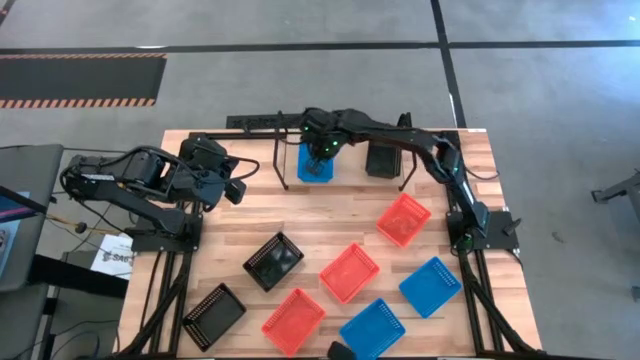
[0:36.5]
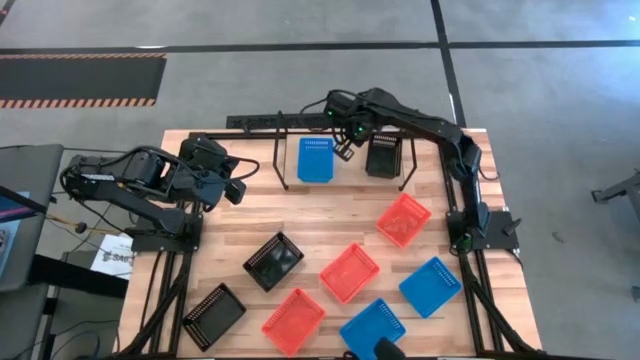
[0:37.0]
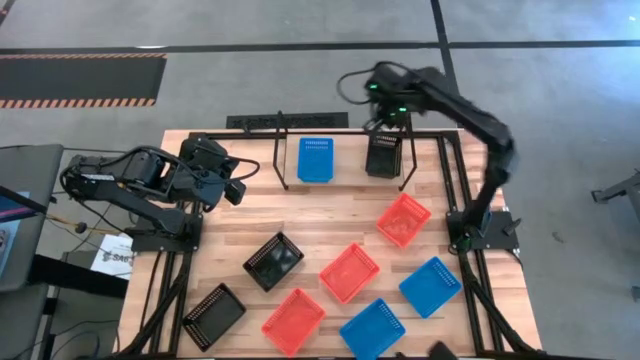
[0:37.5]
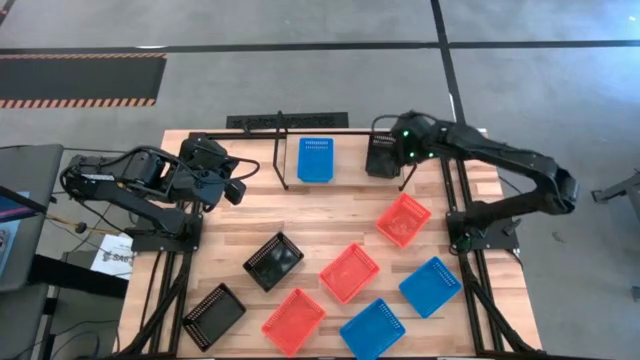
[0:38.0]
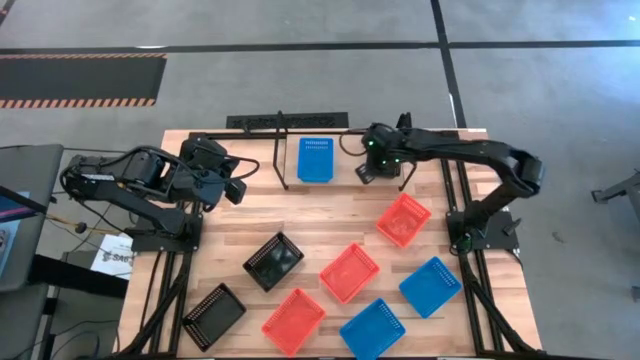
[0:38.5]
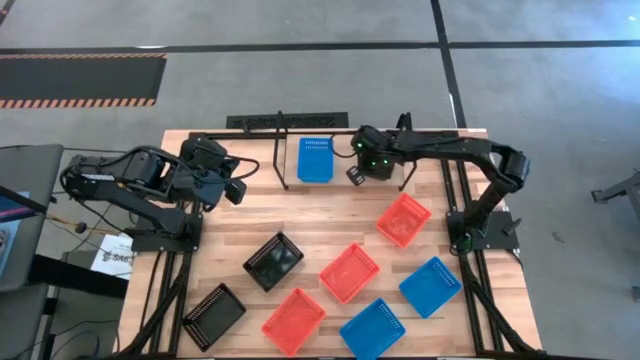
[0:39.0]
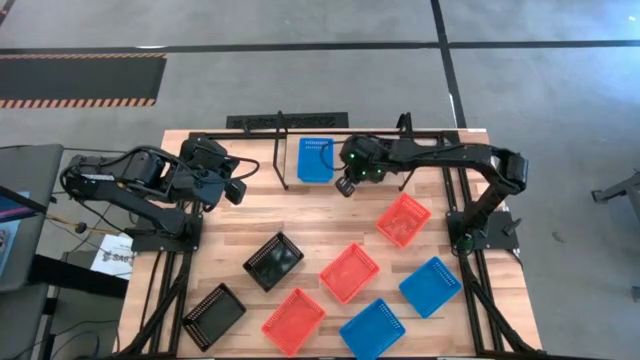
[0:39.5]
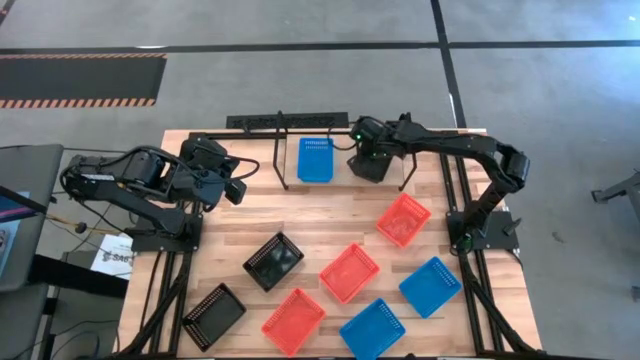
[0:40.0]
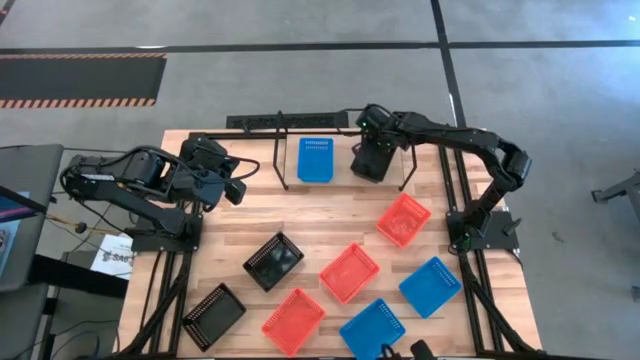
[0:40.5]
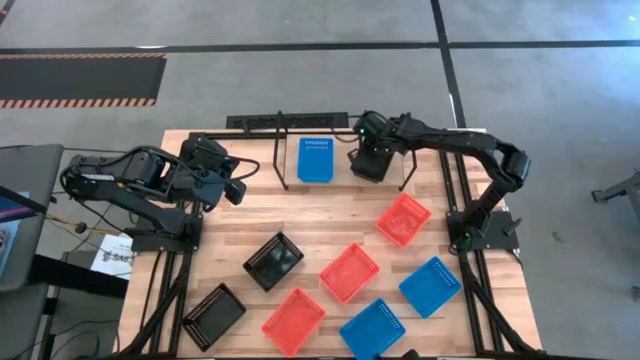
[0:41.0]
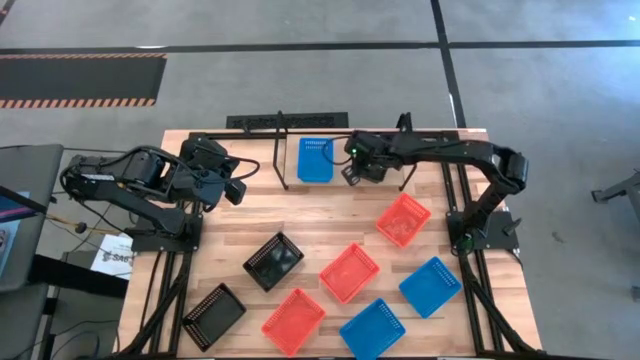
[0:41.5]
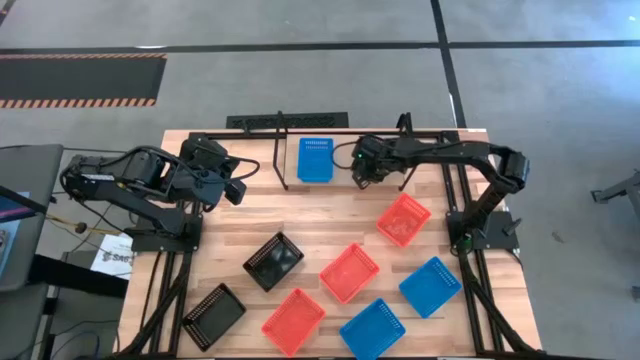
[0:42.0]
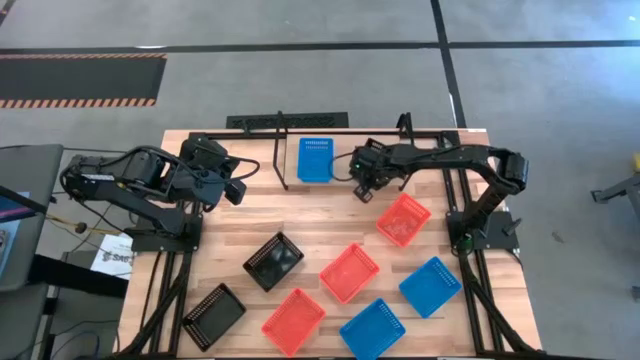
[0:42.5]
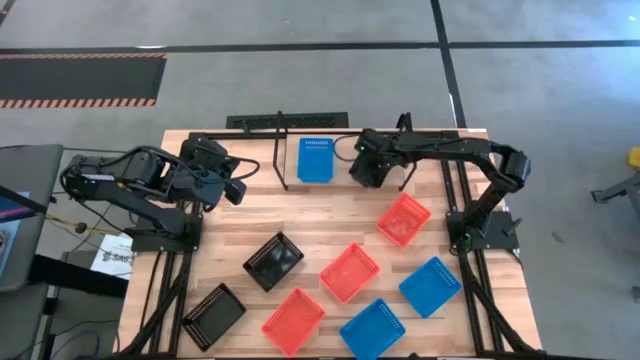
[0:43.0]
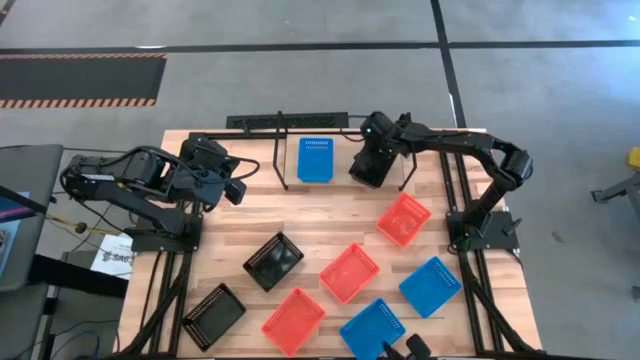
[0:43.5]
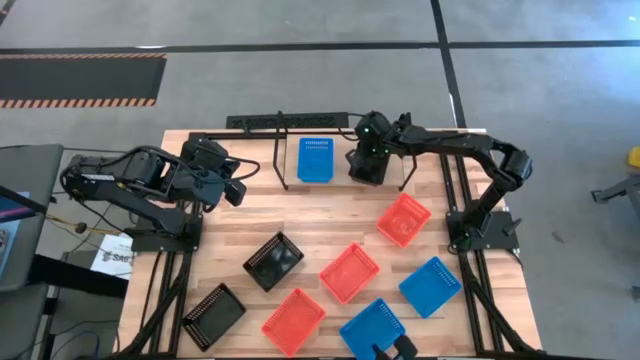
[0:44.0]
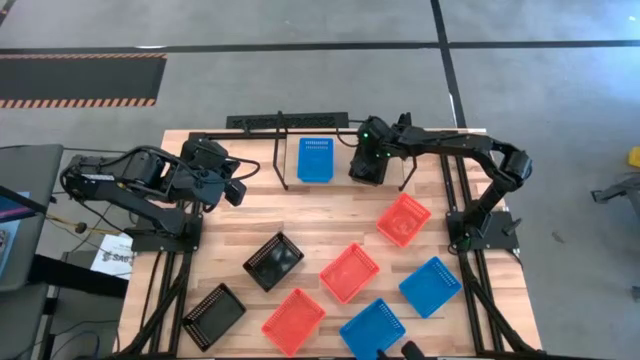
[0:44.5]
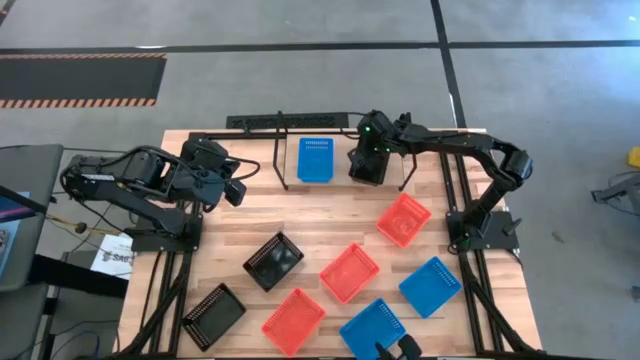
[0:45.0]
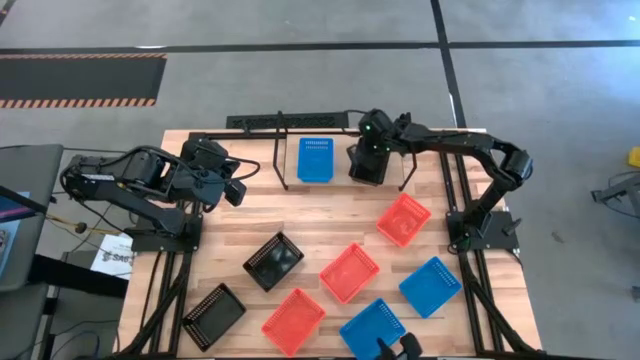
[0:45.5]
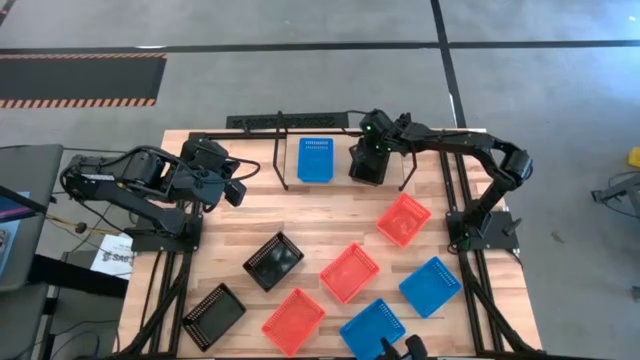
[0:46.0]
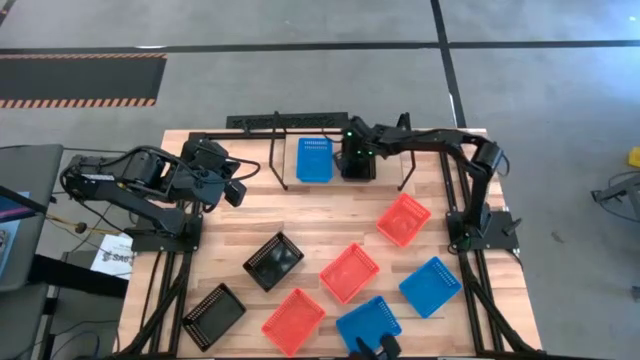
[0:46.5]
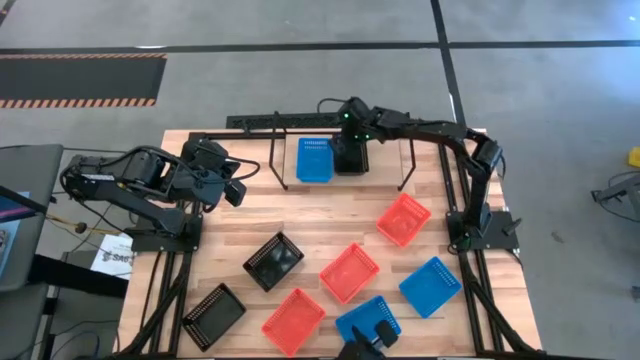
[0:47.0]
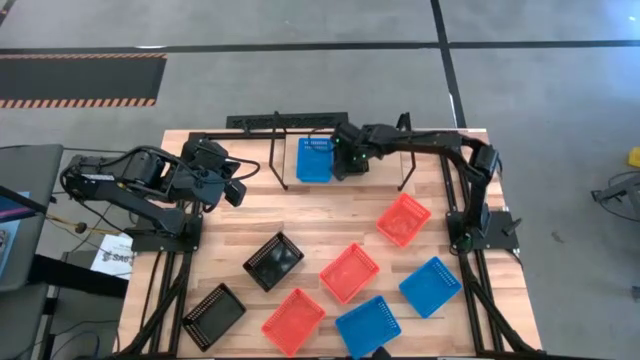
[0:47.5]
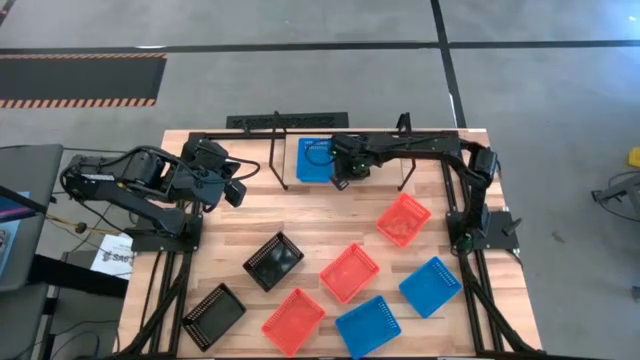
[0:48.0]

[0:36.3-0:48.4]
Task: Stack baskets on shelf by color
Adjust the black bin on the shelf

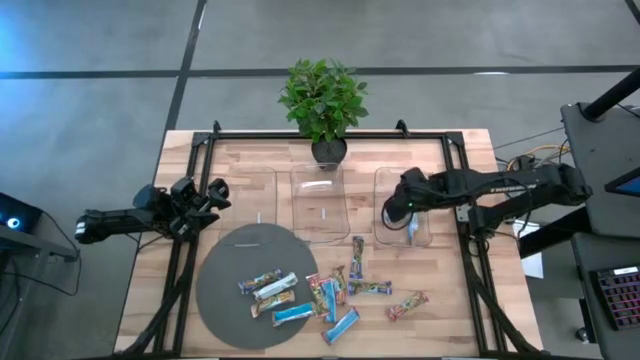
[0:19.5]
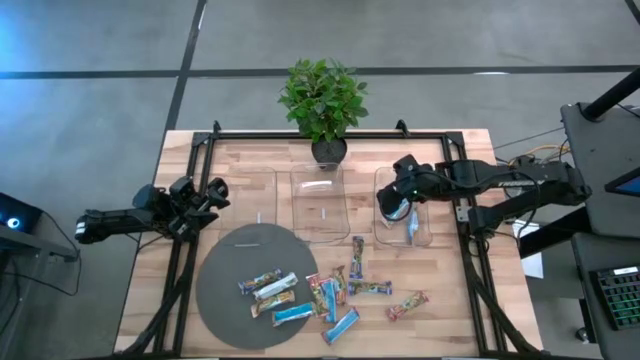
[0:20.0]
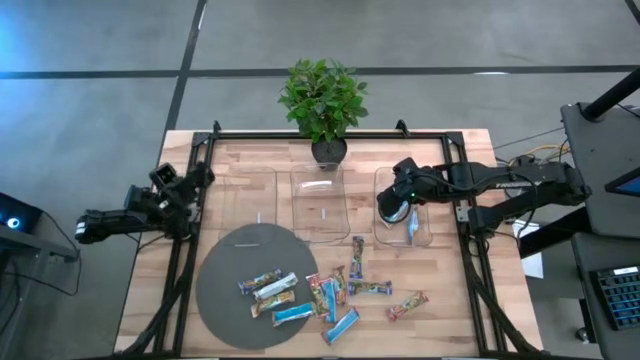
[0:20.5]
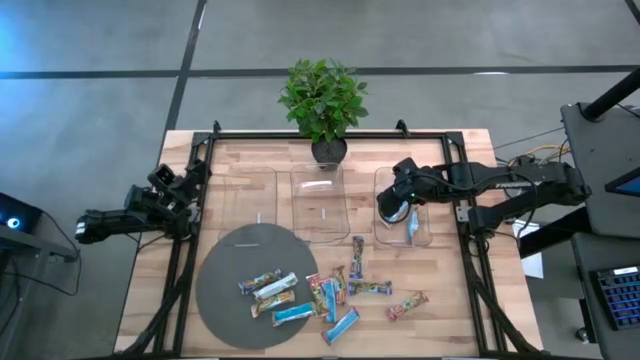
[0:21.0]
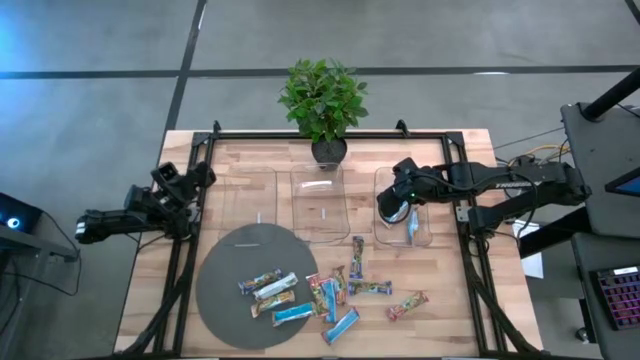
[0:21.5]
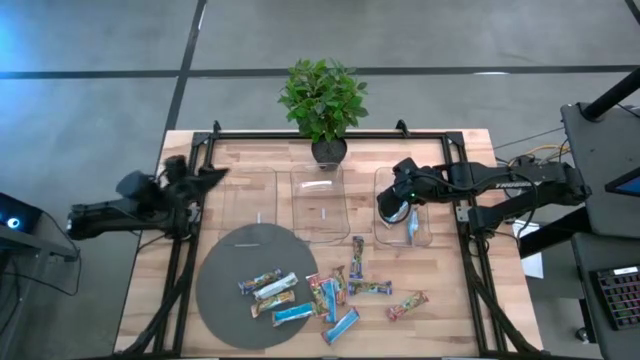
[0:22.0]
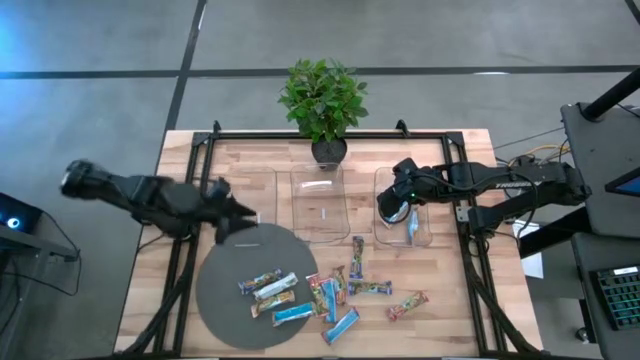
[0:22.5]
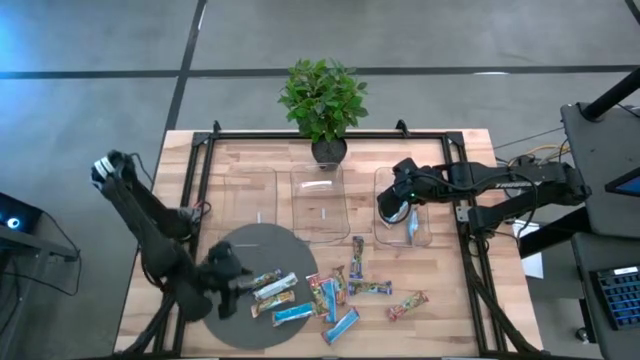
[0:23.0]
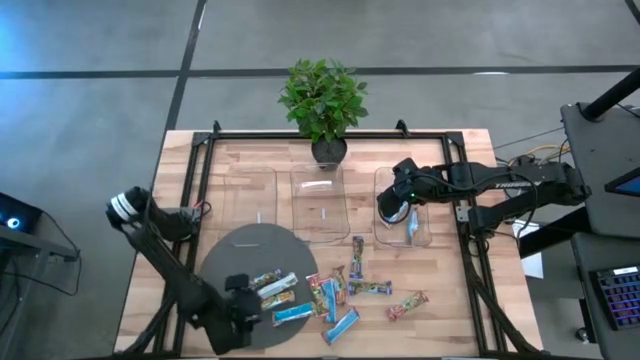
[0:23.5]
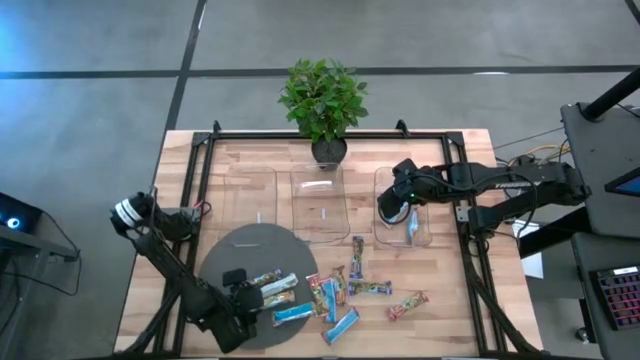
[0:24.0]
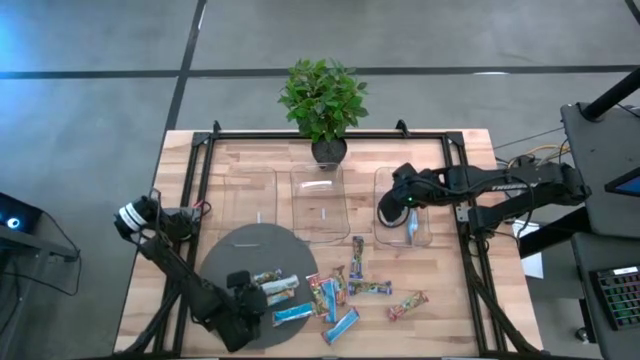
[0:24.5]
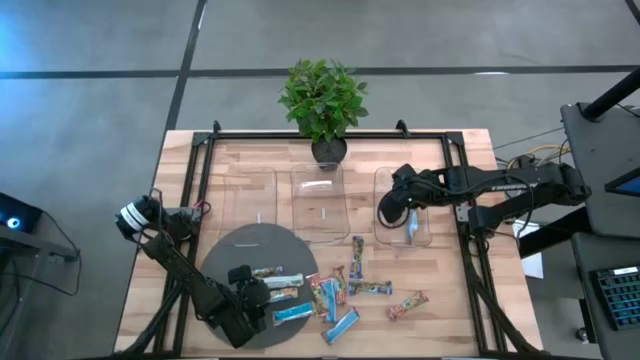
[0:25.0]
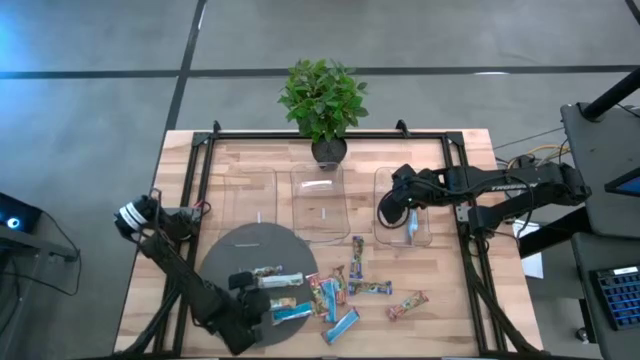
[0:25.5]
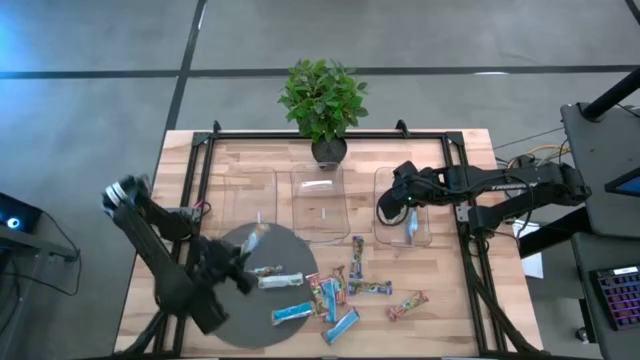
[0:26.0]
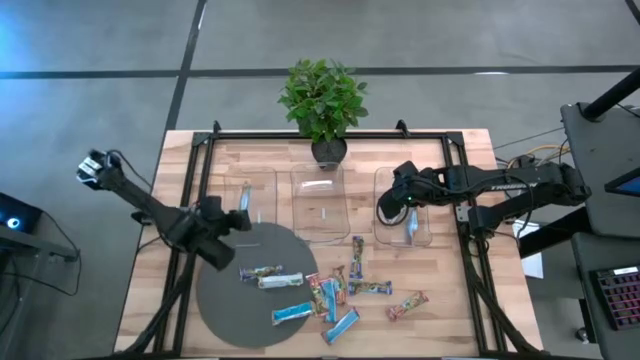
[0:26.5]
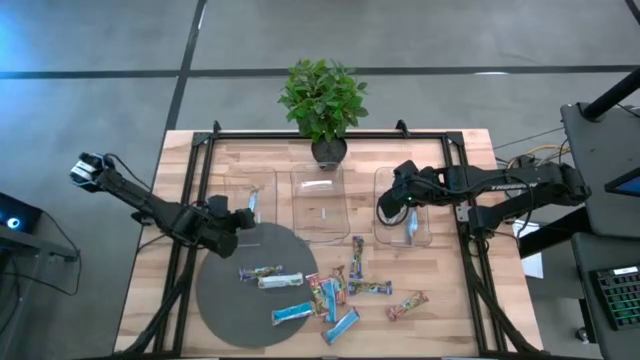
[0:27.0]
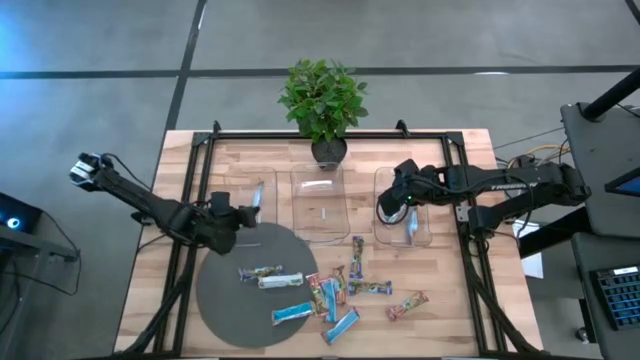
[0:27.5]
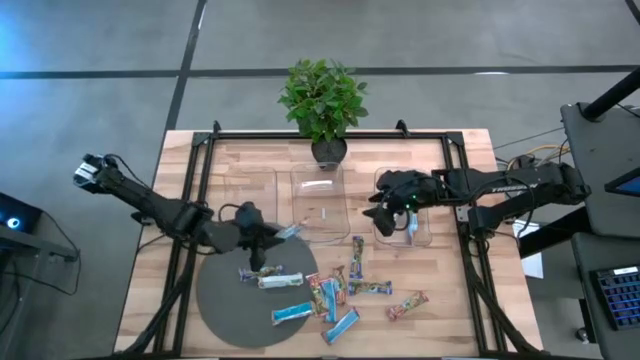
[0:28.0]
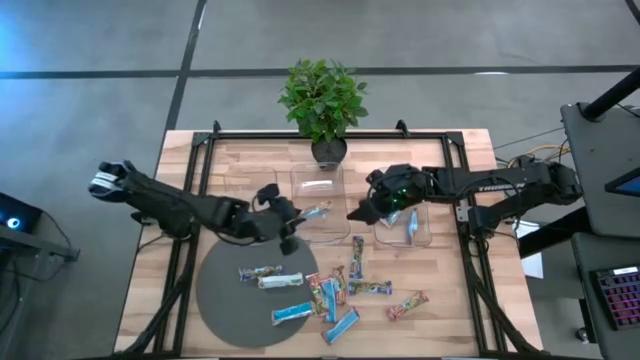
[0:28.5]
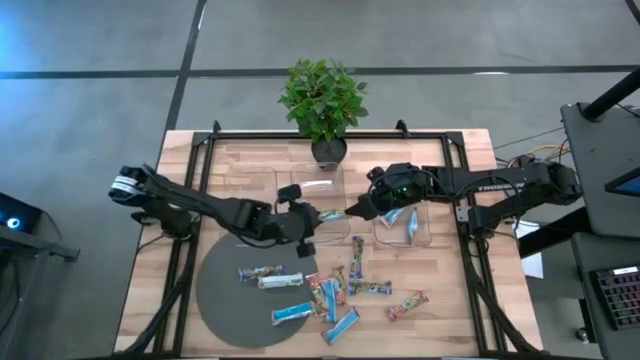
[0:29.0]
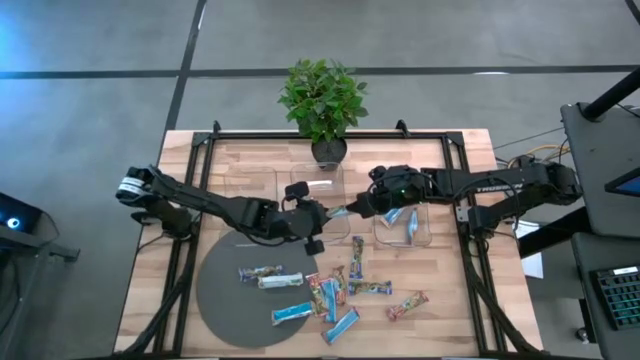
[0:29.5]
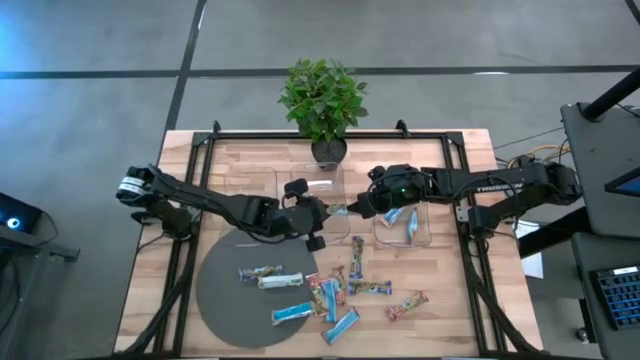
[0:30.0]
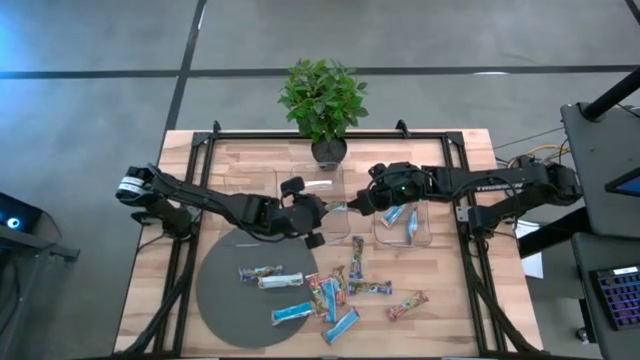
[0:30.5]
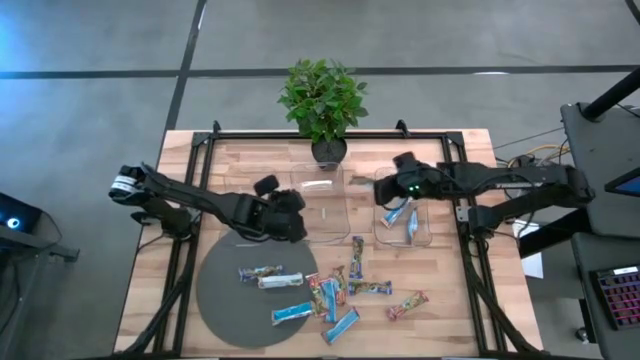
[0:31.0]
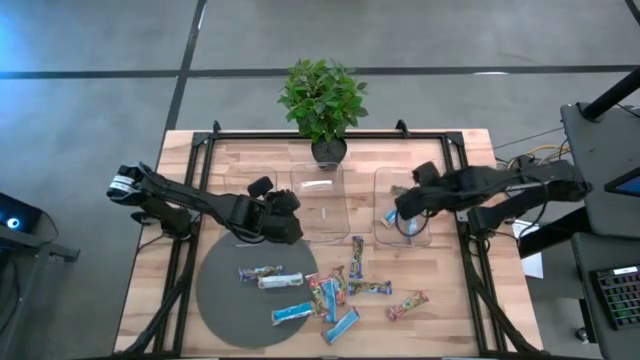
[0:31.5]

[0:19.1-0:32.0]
Task: Pick and place Granola Bars by type
Put the yellow granola bar into the right transparent bin
